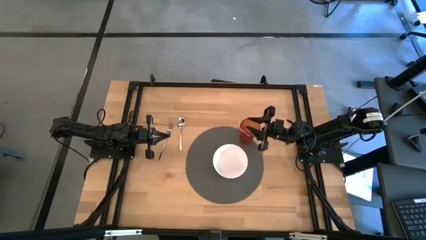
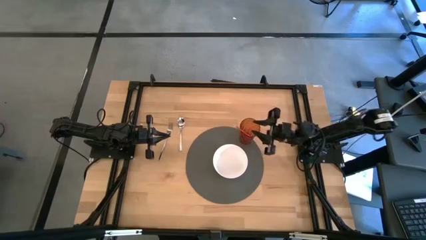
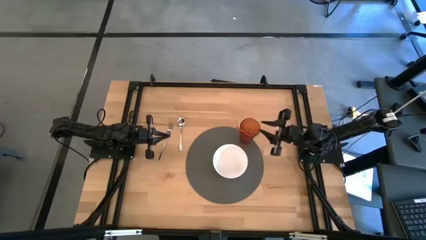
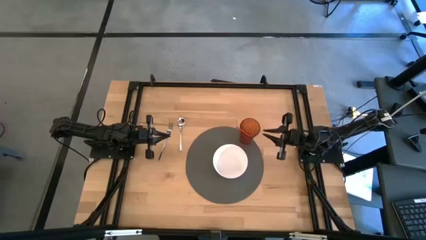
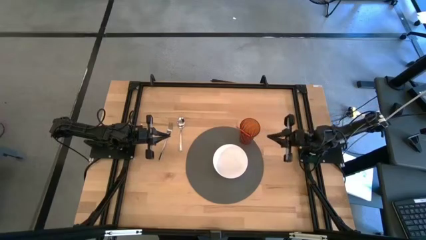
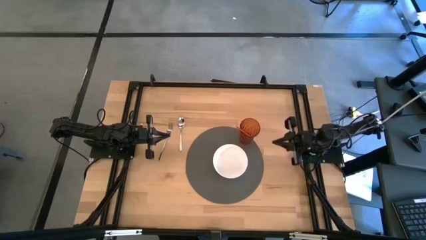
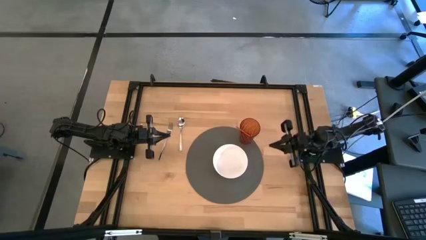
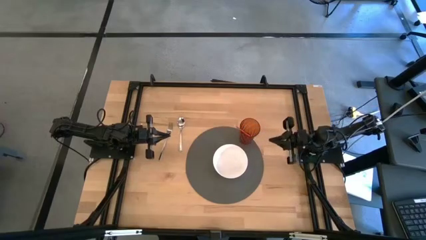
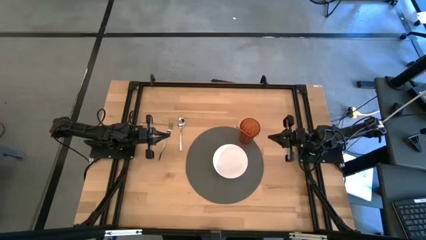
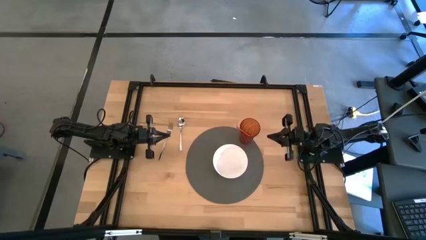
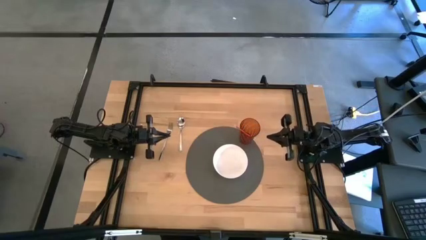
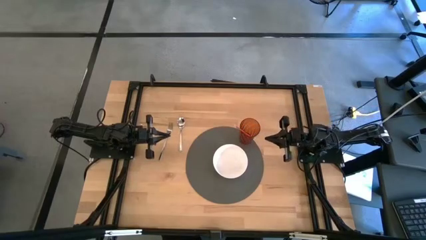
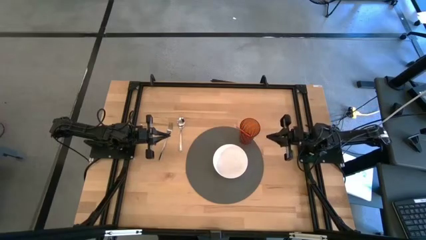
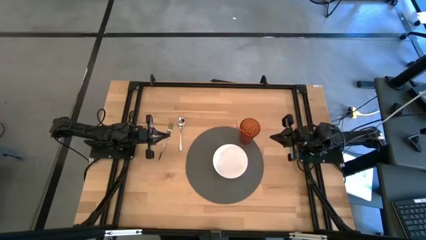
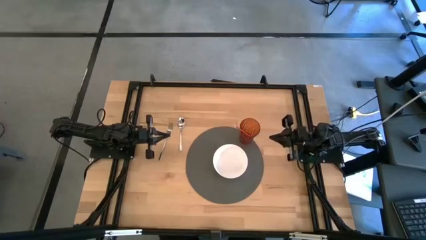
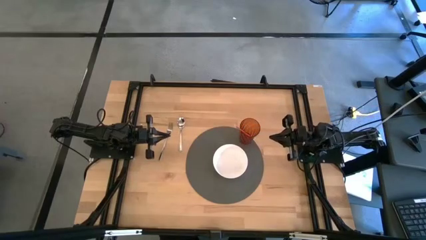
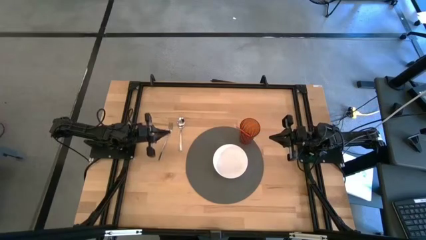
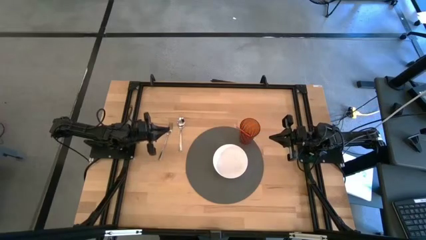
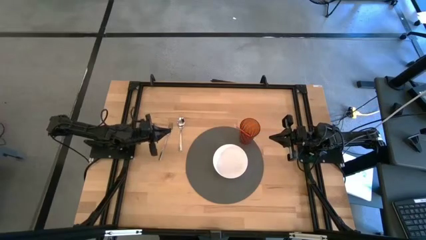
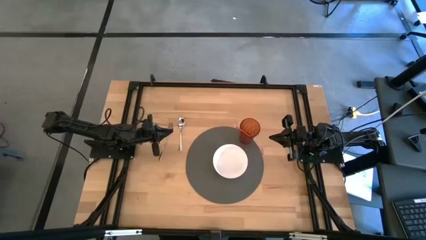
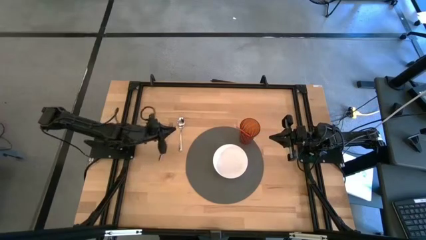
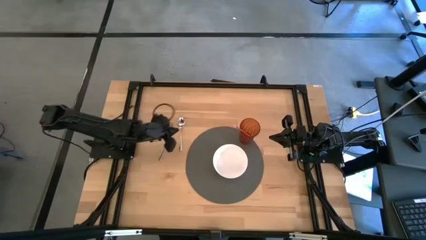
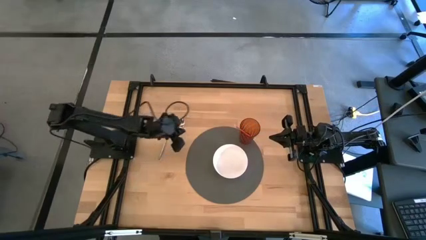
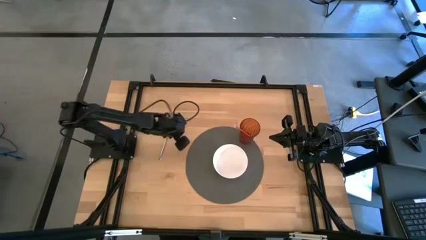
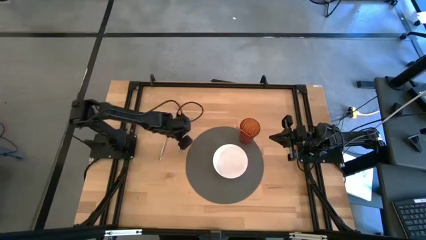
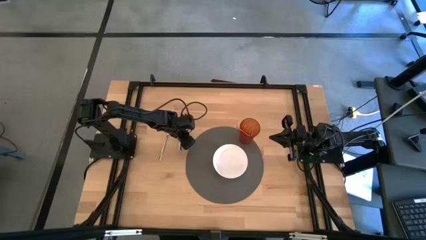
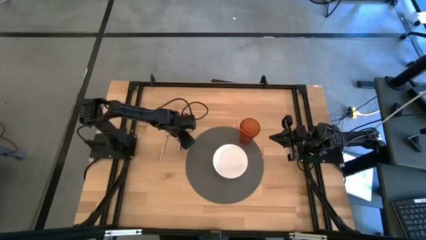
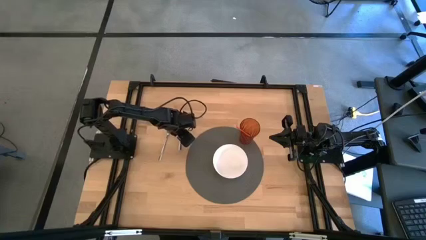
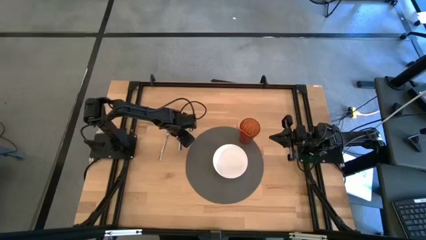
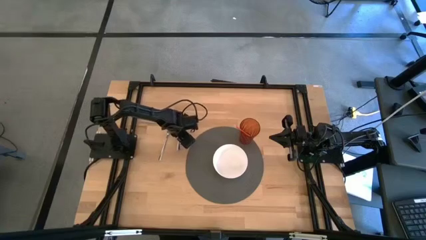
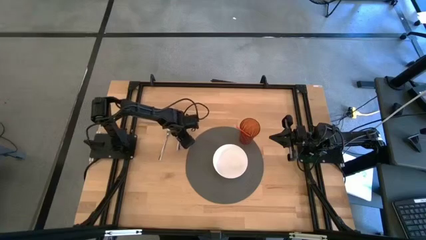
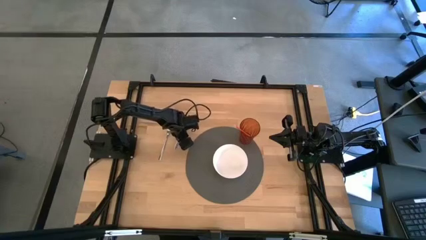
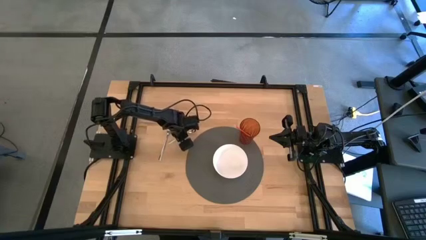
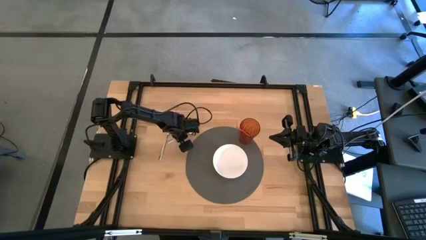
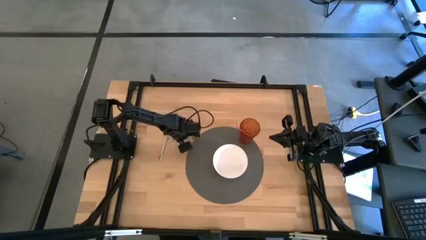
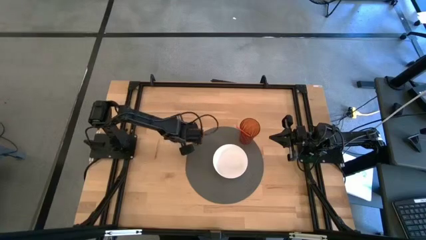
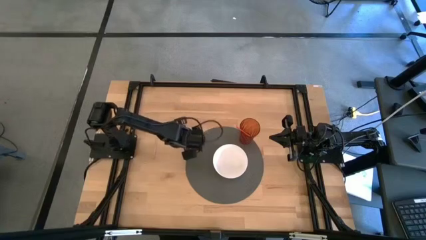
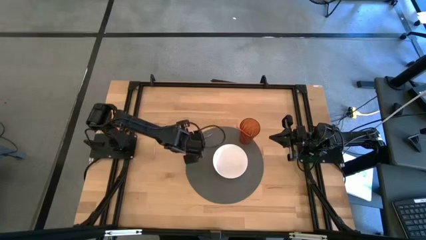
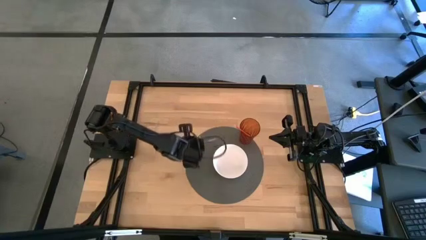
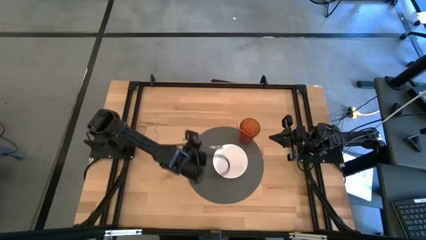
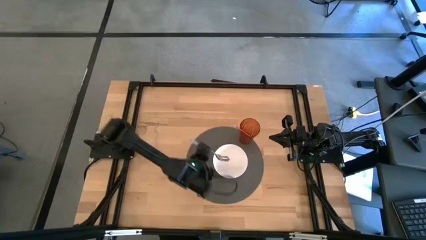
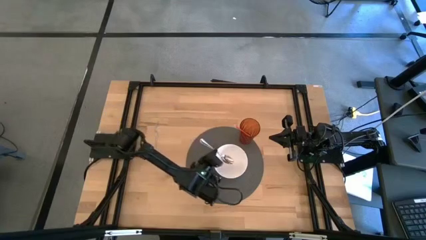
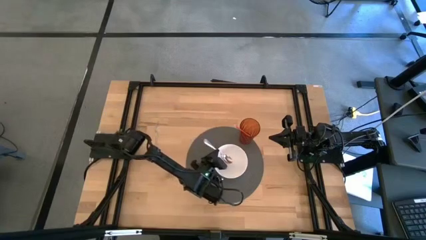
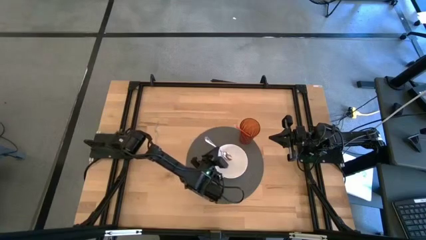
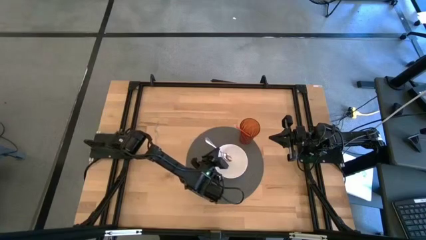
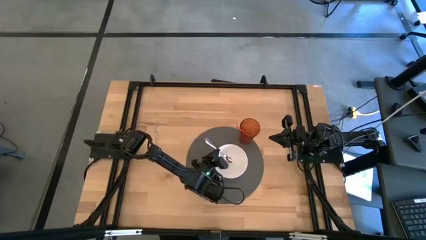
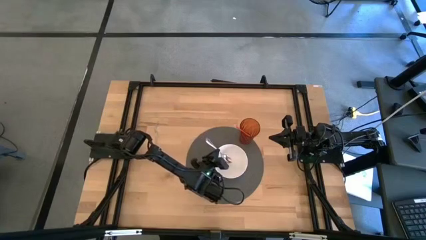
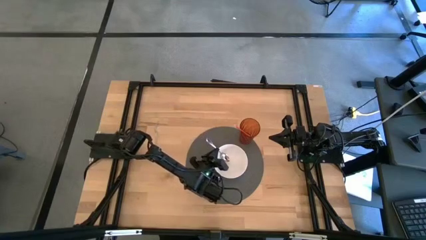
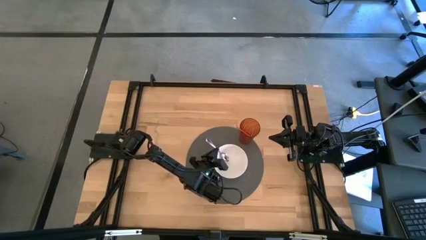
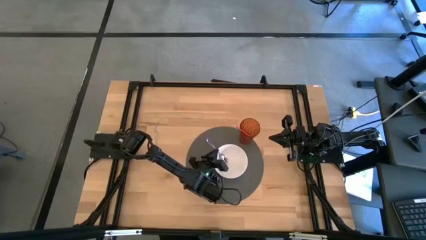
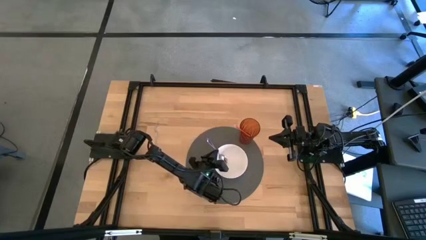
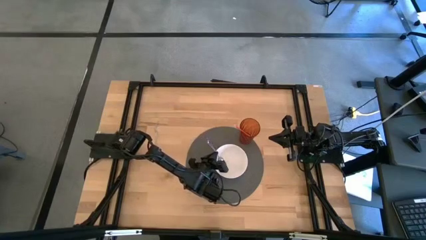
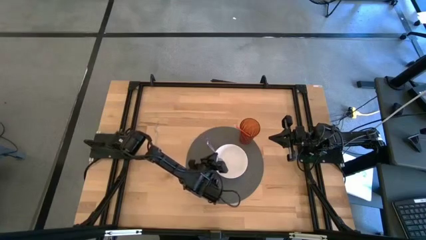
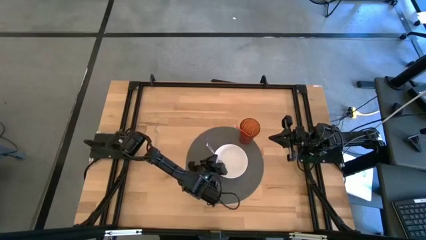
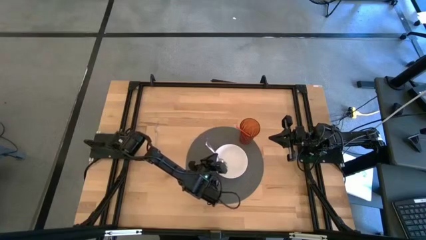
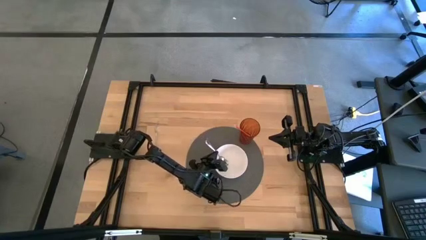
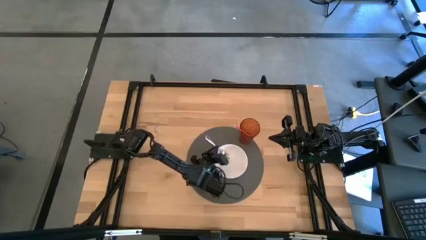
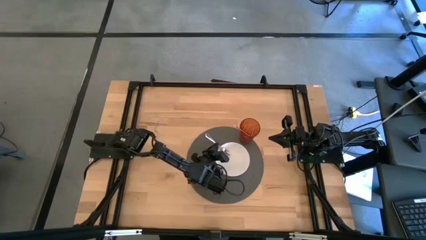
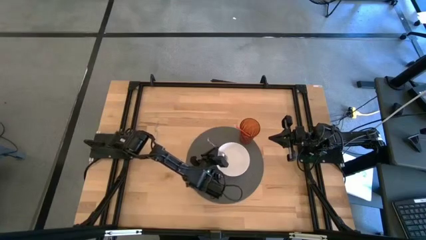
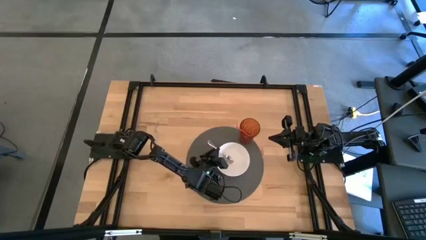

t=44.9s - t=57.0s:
Task: Pick & Place Utensil
Put the silver spoon into the white bowl on the gray mat
